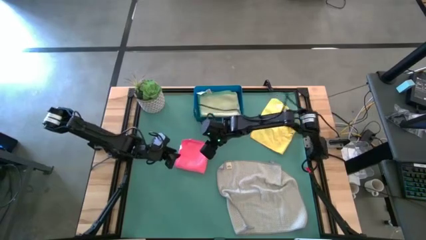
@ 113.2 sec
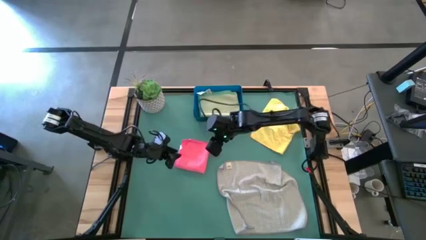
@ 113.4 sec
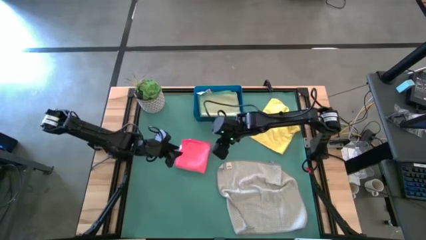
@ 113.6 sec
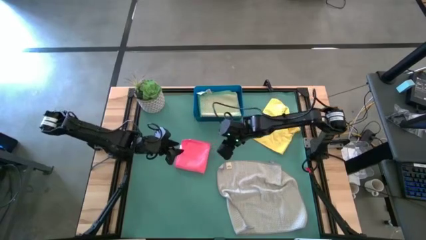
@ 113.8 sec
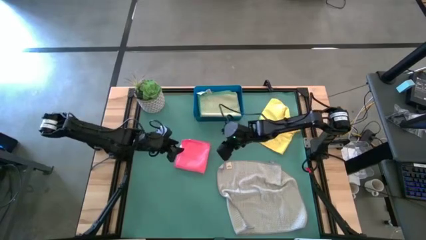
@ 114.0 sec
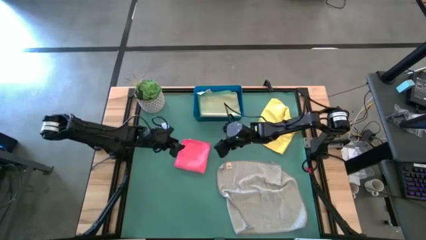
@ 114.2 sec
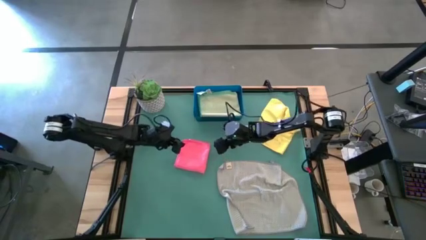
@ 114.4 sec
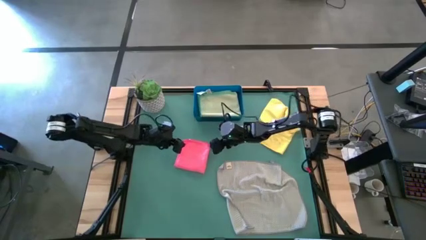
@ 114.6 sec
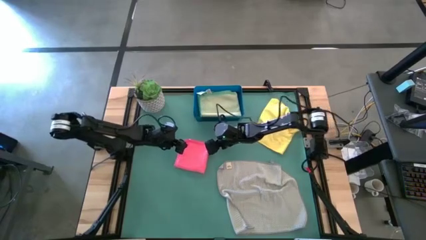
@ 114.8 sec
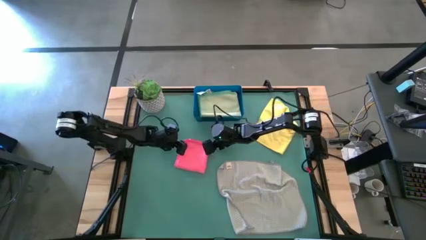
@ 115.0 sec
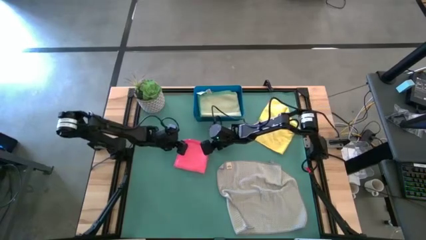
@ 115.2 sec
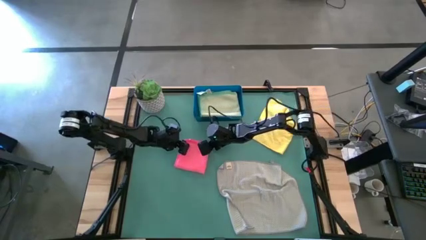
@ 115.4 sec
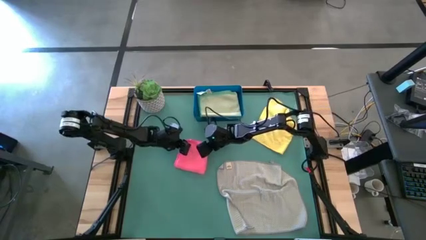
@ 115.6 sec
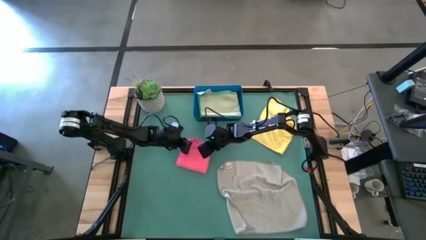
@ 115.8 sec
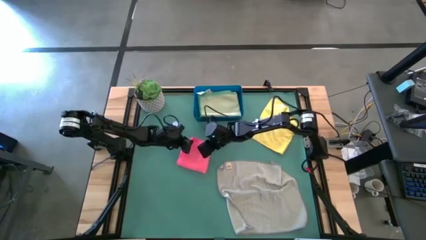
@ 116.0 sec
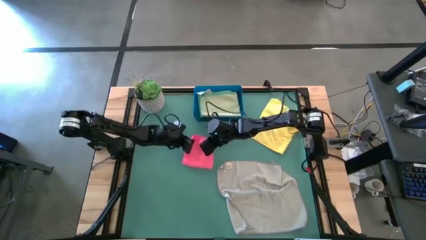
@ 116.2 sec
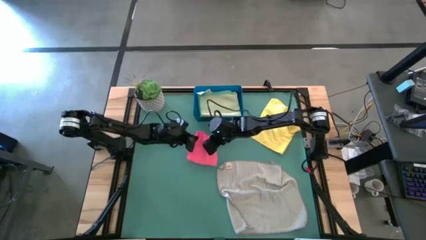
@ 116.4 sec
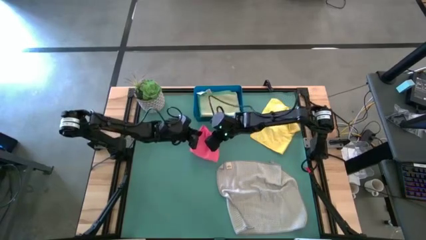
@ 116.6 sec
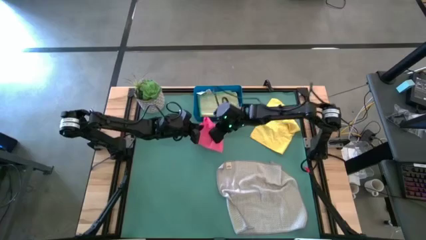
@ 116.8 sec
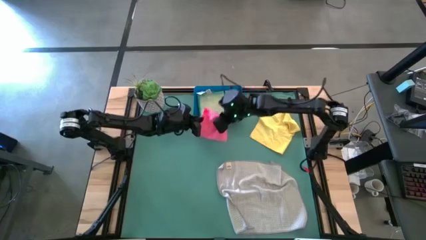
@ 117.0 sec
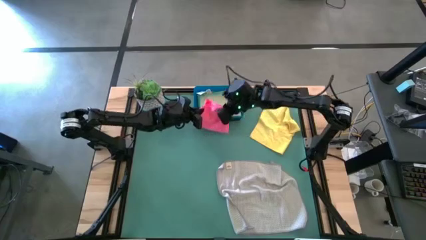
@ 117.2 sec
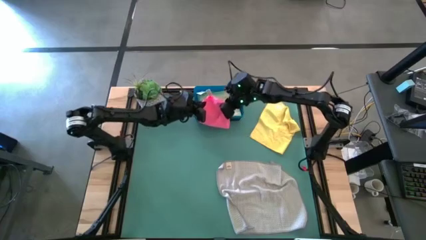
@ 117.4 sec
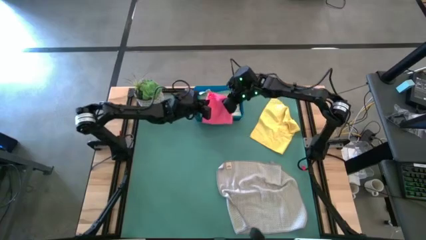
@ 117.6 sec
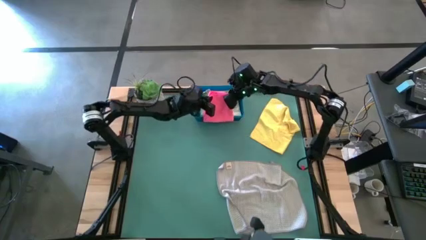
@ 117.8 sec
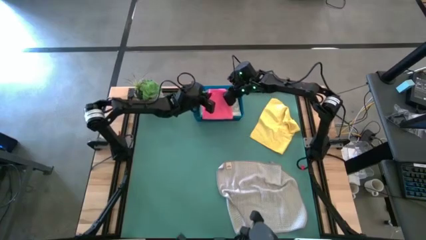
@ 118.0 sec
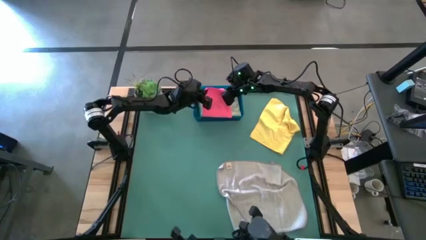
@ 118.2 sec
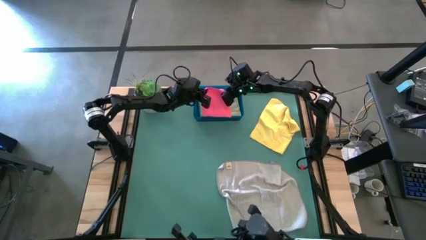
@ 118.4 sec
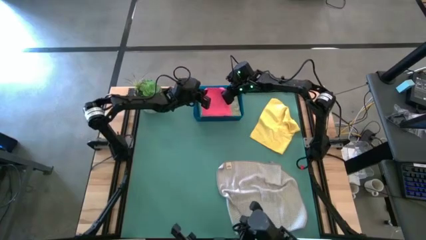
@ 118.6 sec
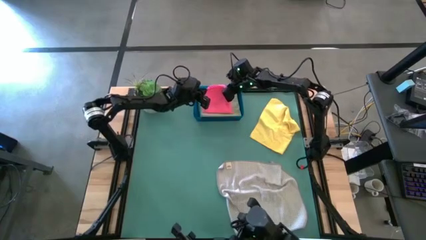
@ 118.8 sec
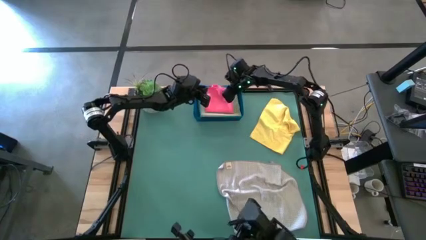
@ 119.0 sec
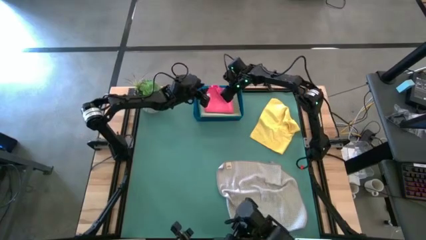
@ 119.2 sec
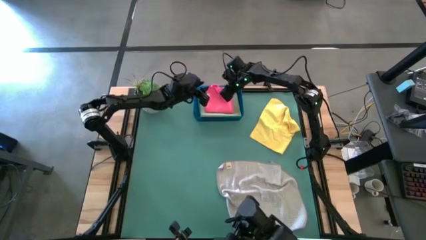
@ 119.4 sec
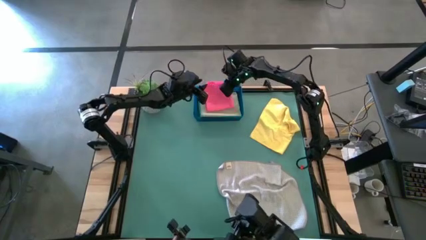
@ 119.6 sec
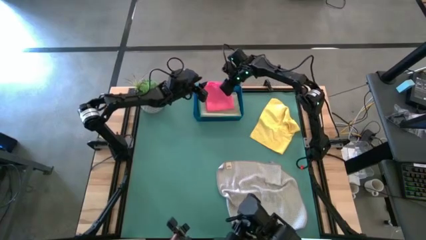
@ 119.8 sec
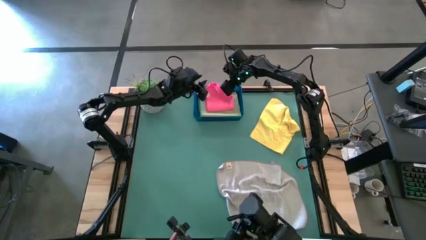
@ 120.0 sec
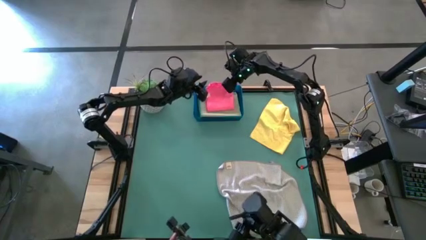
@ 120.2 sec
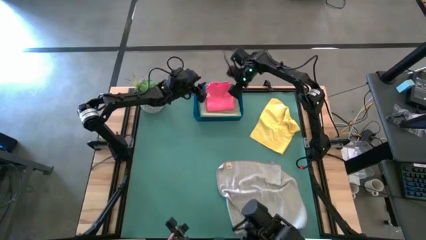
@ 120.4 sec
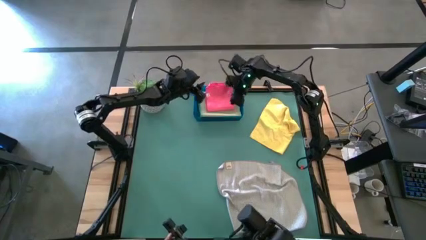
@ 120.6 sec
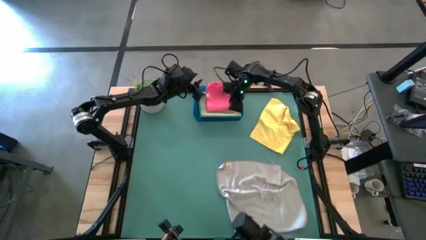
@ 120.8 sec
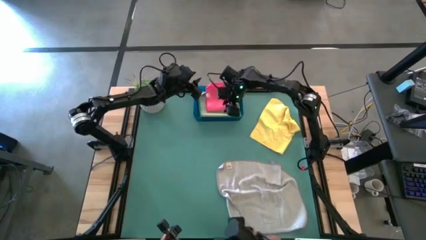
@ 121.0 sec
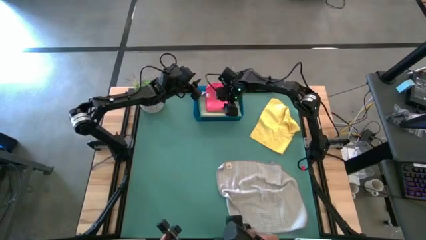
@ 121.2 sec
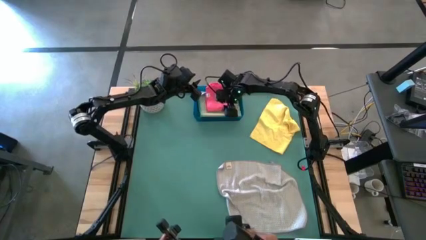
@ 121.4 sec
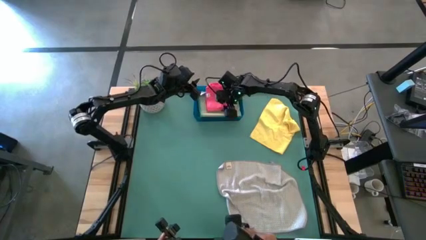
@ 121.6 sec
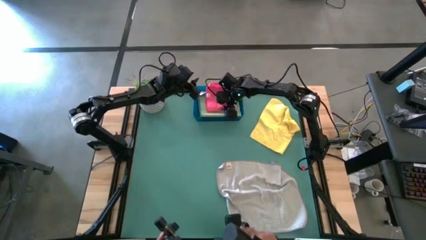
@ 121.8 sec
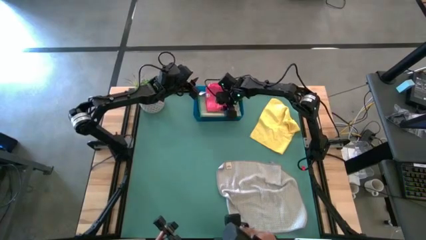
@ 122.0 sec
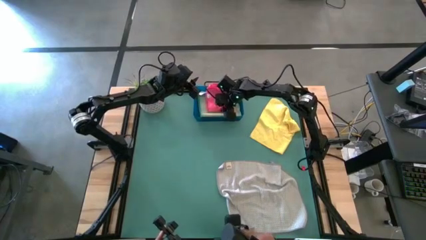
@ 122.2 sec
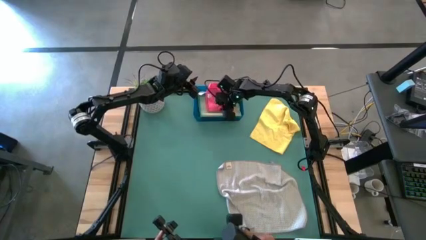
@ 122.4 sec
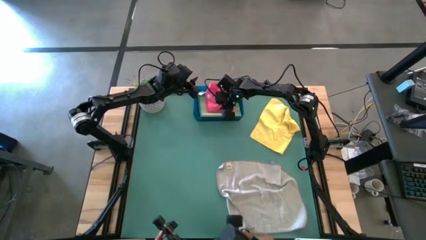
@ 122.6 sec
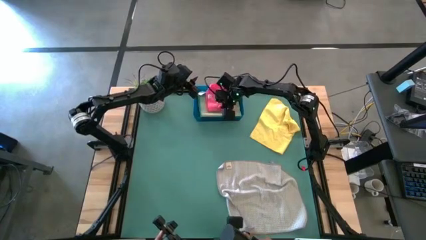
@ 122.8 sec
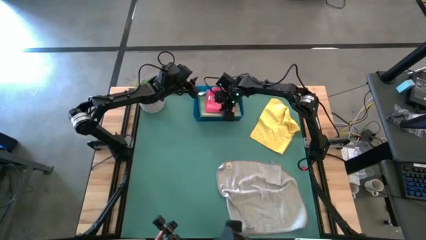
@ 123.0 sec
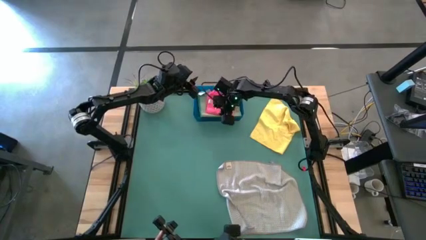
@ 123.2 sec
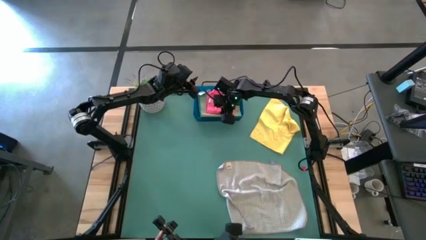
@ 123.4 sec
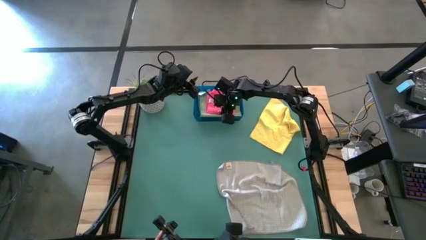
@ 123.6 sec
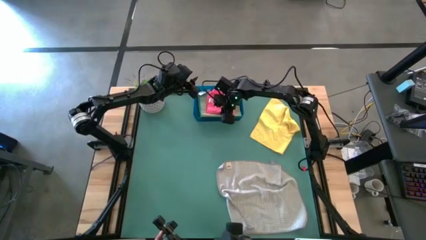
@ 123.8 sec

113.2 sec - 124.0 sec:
Task: Fold microfiber towels
Put the folded pink microfiber towel into the blue bin

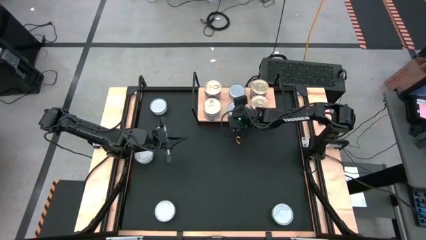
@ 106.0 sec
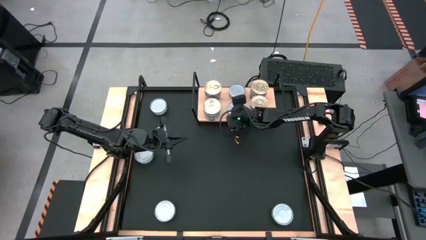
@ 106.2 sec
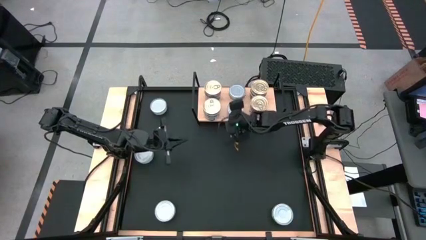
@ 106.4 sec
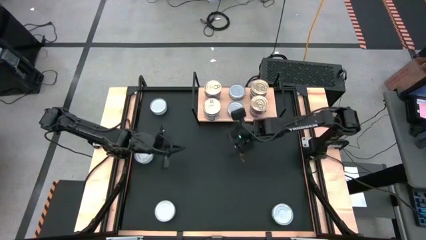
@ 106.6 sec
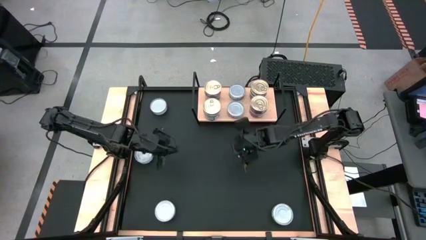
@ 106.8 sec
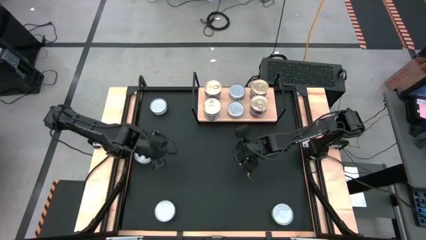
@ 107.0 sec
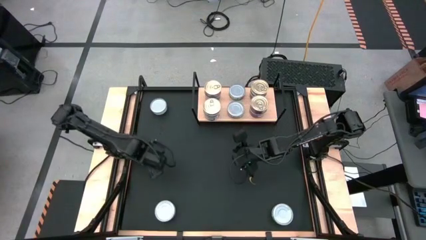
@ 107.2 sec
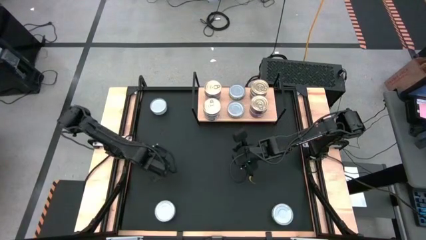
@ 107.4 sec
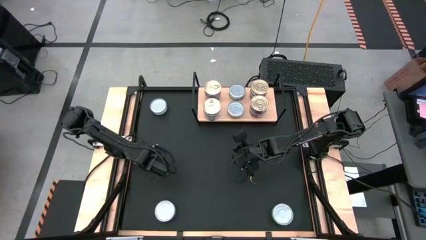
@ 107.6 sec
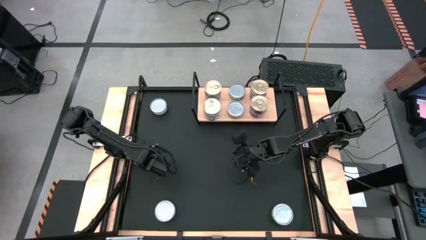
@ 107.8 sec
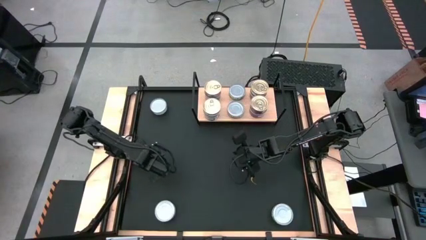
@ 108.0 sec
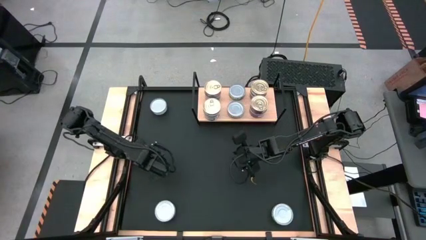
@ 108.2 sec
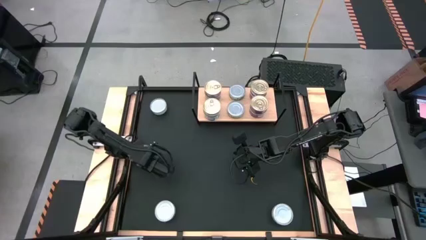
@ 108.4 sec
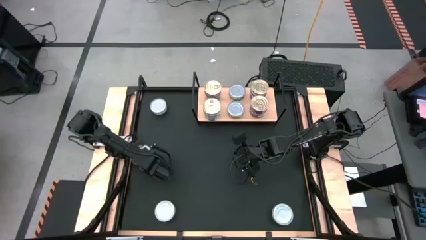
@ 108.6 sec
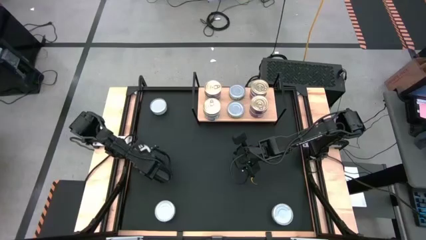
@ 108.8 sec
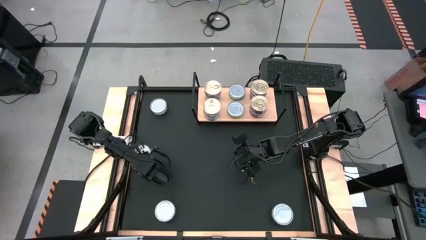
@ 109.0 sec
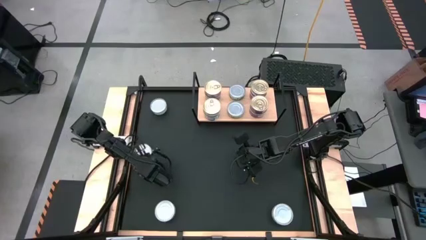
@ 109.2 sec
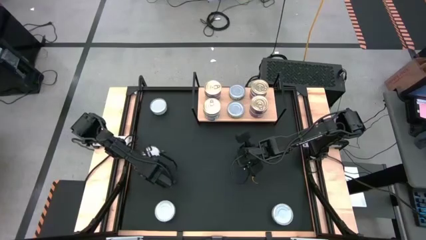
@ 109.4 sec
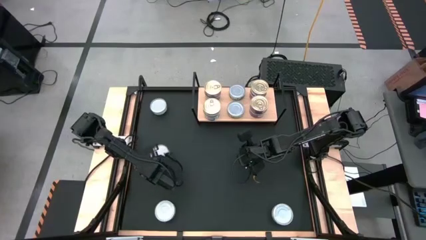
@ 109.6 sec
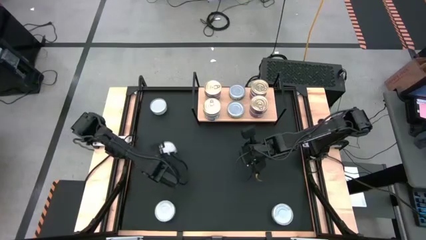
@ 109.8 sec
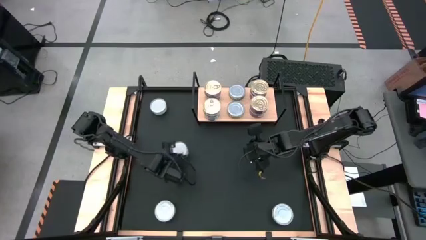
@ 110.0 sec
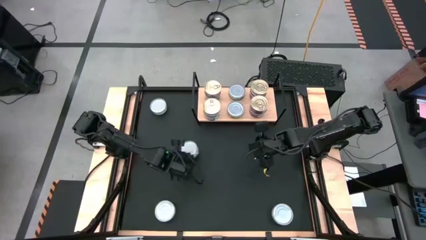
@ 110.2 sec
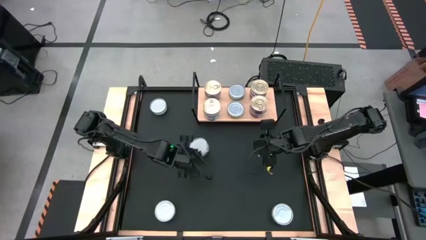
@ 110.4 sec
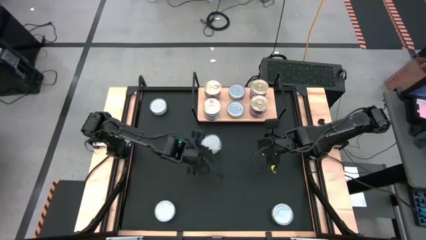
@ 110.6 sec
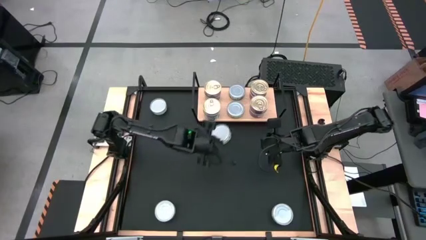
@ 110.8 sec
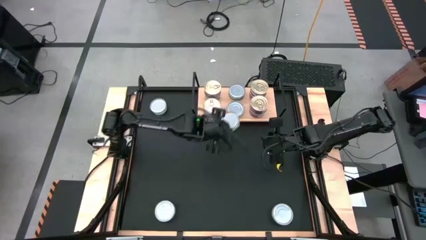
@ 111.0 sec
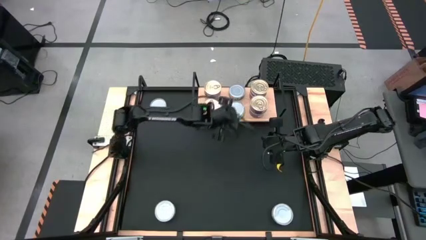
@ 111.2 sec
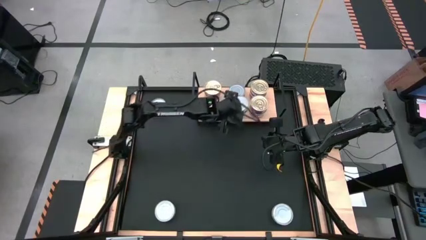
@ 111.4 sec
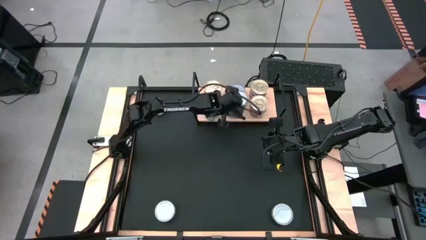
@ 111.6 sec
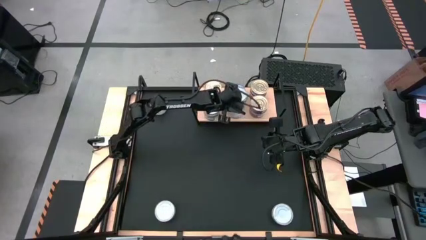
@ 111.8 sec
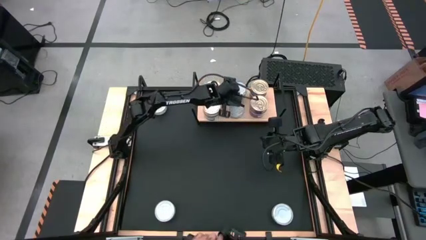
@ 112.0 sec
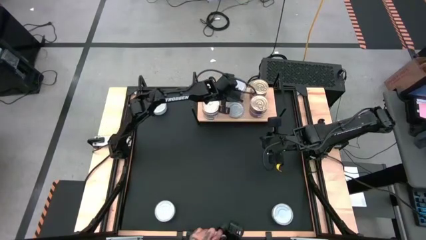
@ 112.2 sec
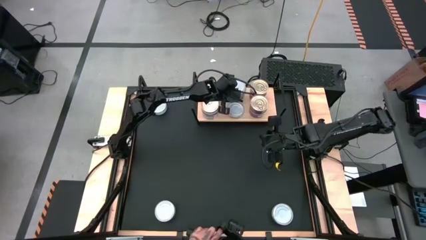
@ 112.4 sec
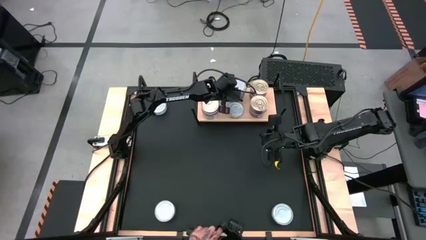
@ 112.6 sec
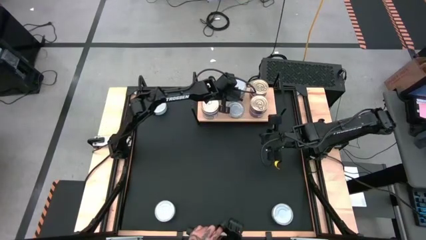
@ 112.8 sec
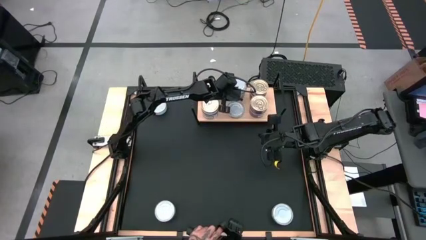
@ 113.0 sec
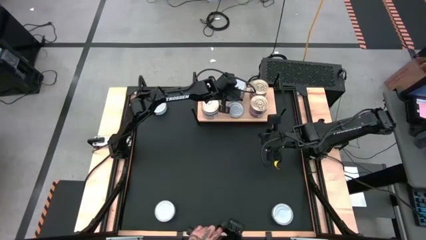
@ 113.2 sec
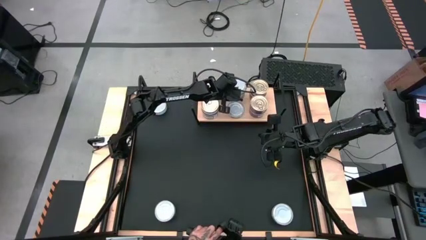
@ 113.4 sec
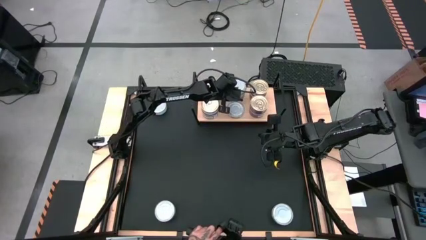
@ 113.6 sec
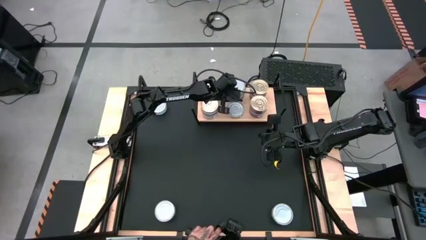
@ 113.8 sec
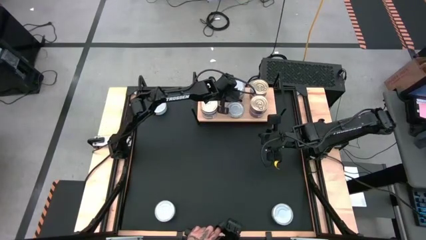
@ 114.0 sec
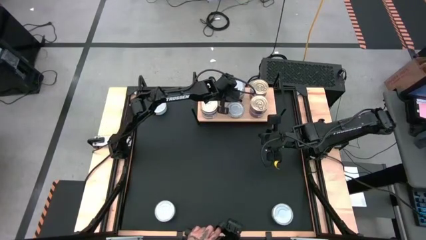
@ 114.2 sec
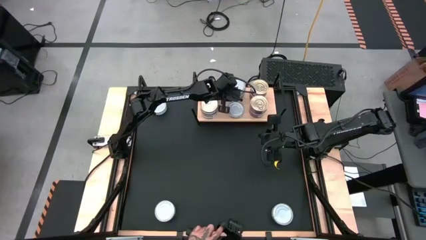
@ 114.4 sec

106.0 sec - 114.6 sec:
Task: Stack canned seafood by type on shelf
Stack the green tuna can on top of the other green tuna cans on the shelf
